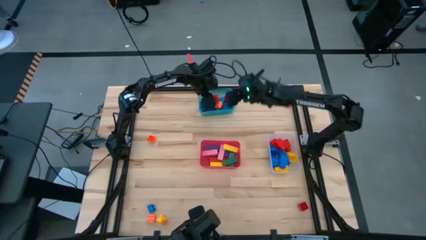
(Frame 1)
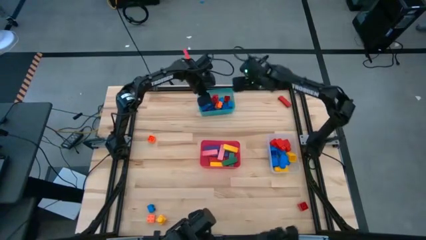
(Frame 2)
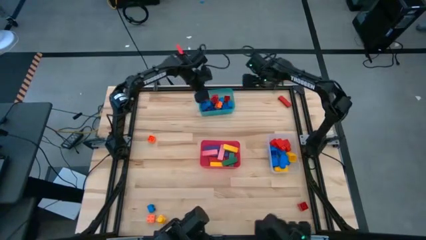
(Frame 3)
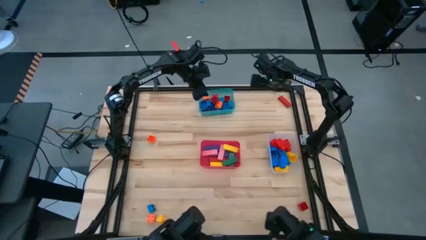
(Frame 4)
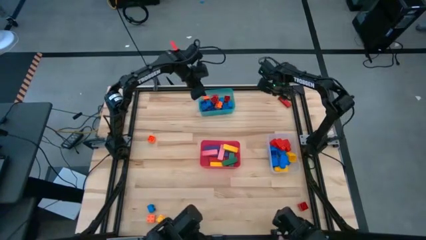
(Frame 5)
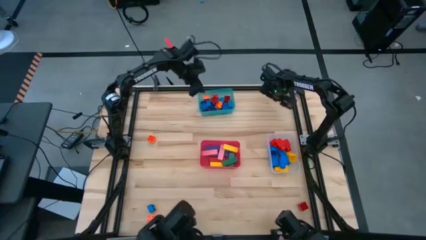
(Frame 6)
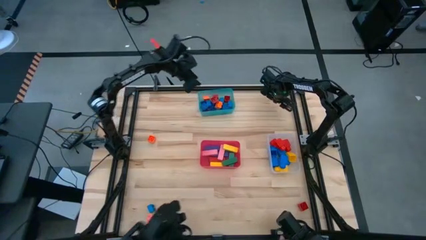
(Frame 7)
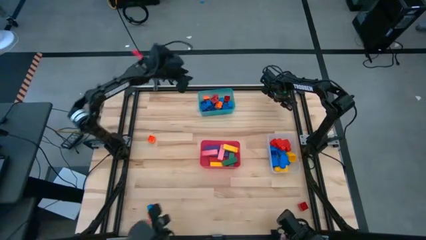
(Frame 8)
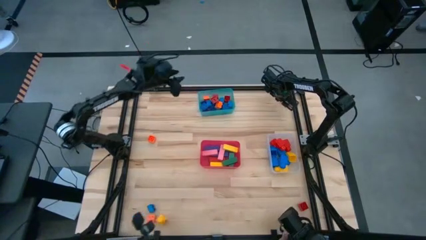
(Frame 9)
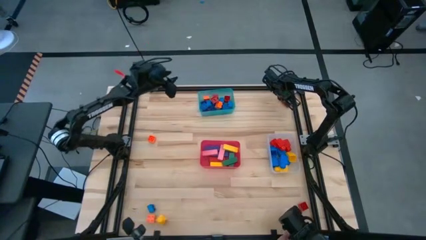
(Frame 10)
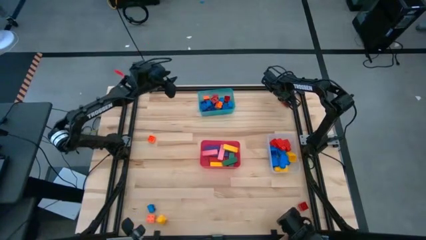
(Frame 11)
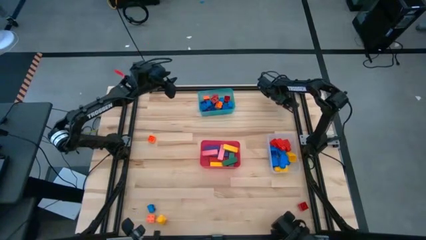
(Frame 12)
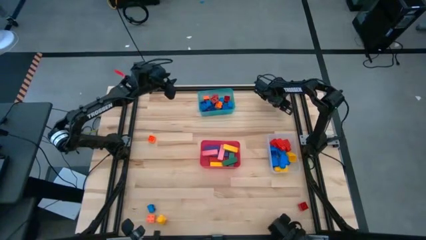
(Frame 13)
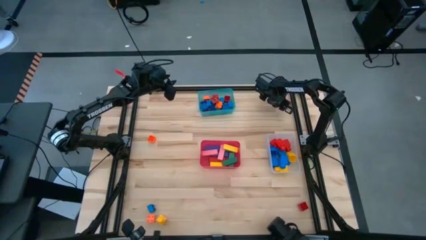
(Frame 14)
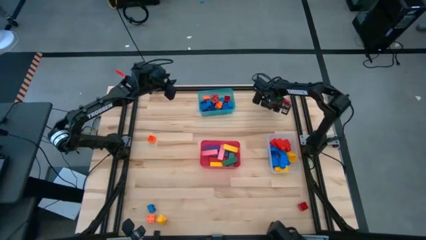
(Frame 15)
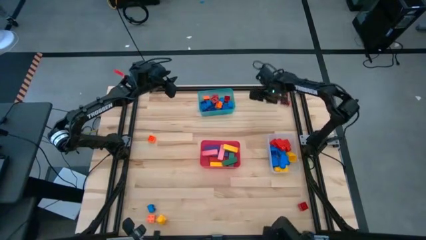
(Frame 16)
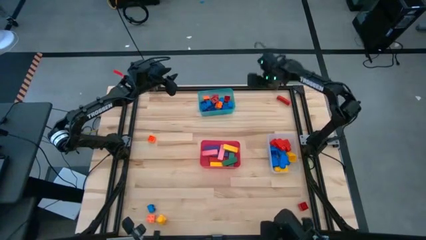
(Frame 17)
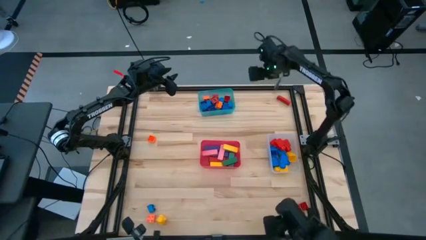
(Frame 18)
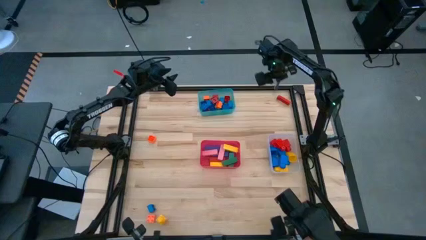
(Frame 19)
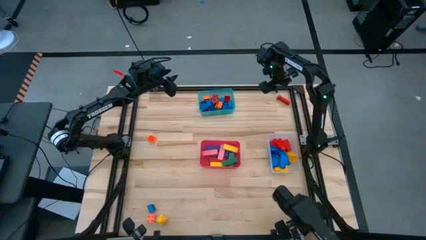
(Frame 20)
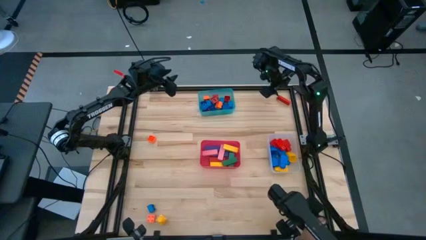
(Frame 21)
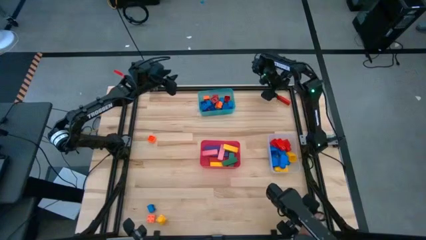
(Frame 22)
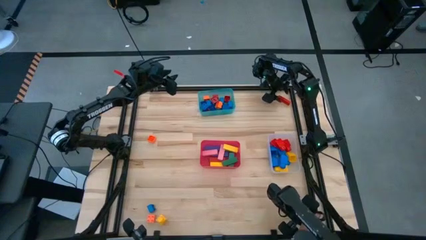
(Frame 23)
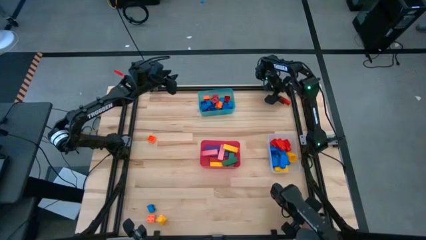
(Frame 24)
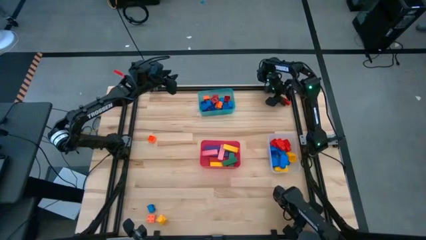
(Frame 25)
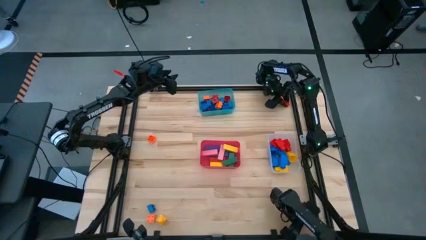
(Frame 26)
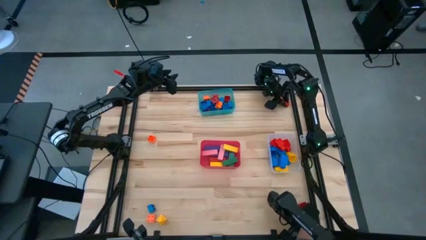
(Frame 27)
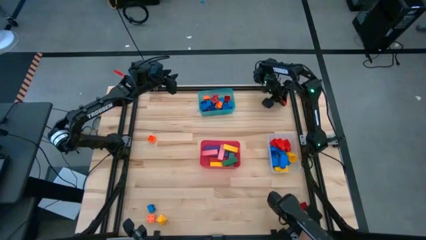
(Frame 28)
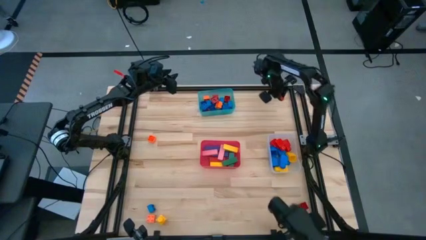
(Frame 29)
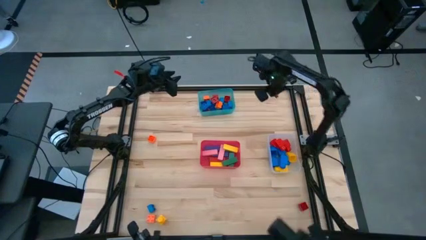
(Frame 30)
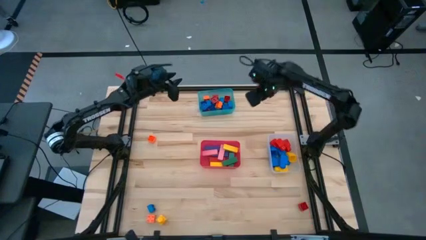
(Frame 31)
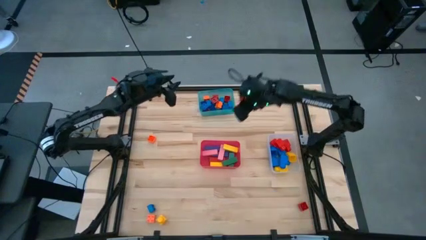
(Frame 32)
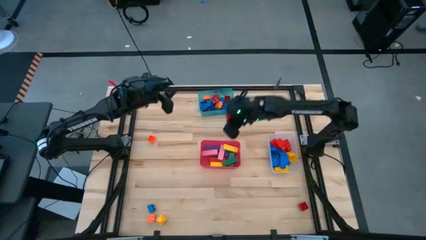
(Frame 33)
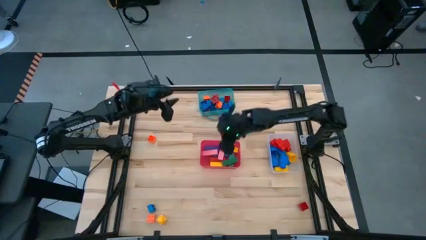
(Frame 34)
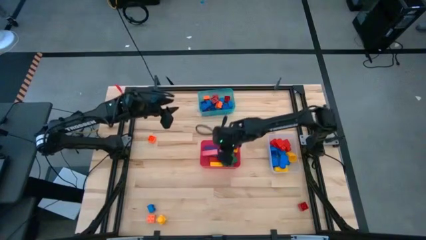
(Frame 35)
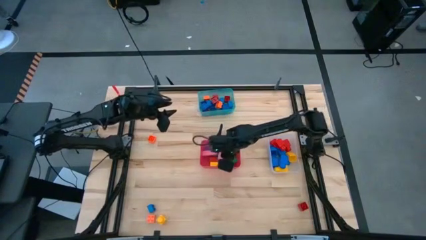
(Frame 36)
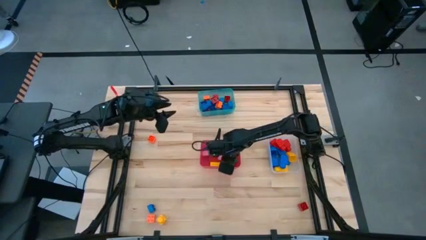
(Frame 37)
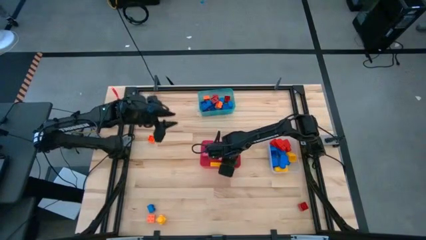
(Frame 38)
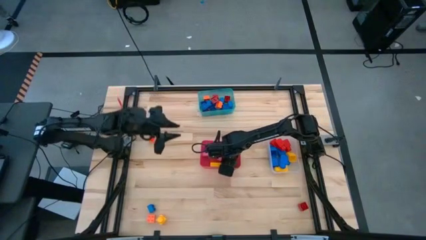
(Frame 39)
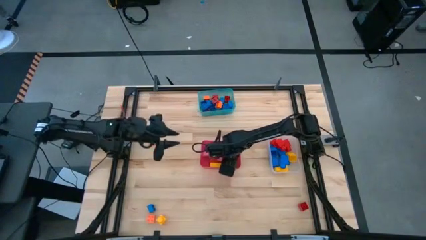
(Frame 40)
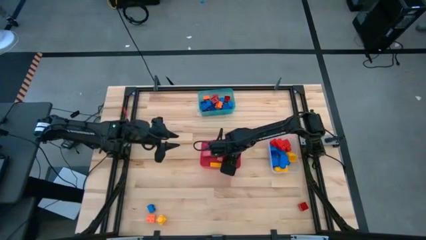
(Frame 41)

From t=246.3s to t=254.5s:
Task: Sort blocks by size
Put the red block into red bin

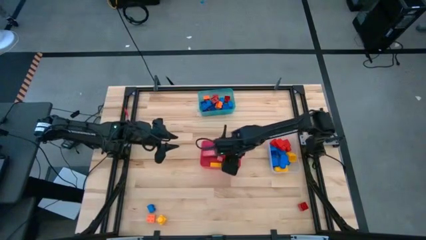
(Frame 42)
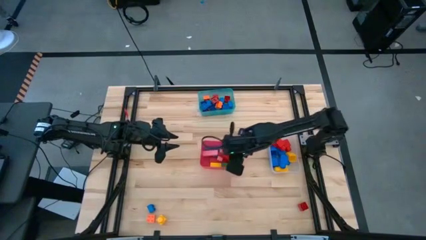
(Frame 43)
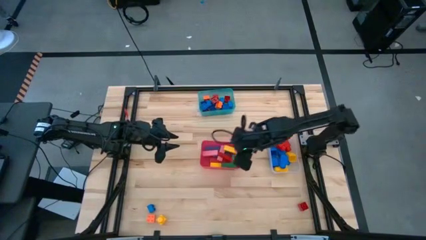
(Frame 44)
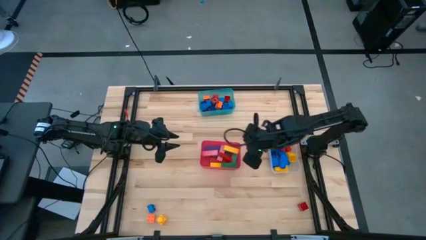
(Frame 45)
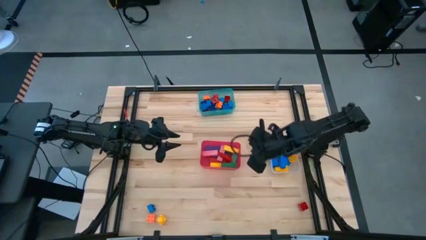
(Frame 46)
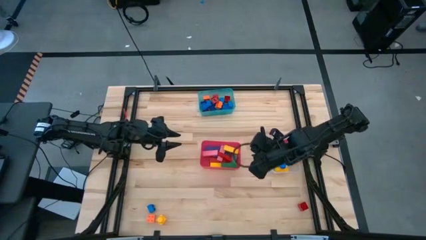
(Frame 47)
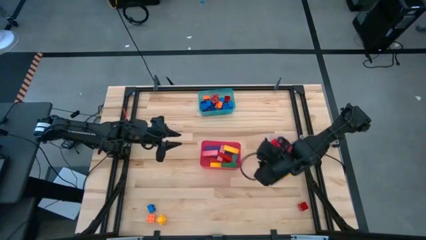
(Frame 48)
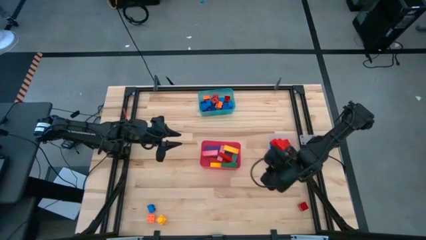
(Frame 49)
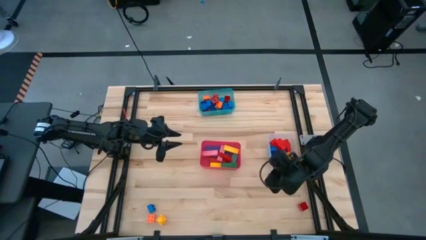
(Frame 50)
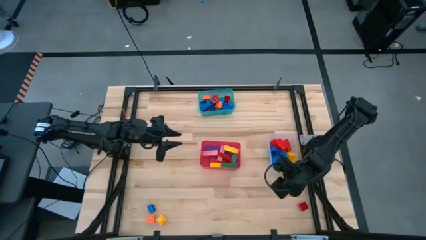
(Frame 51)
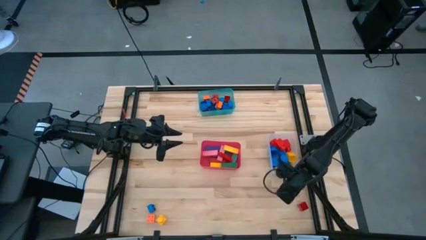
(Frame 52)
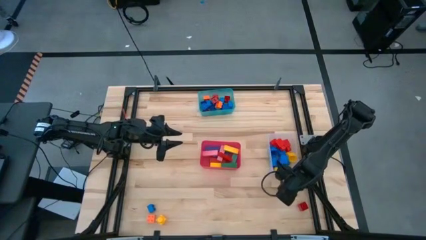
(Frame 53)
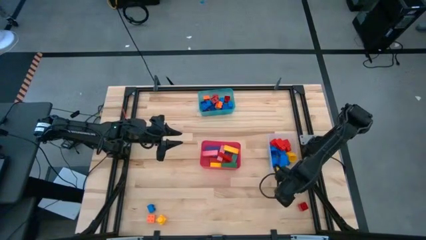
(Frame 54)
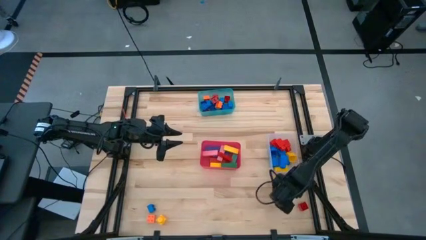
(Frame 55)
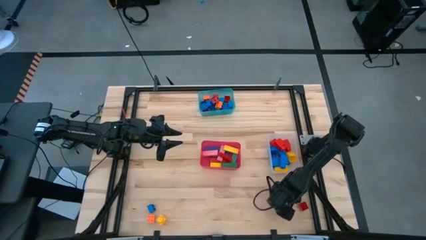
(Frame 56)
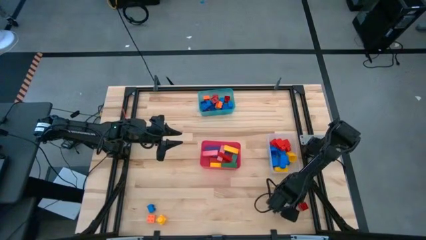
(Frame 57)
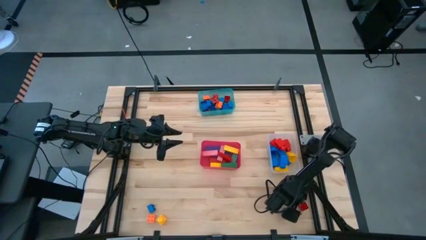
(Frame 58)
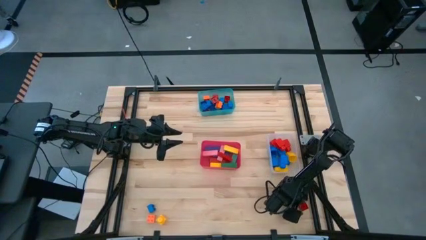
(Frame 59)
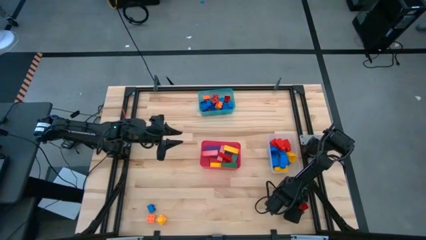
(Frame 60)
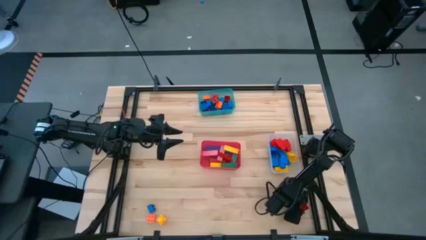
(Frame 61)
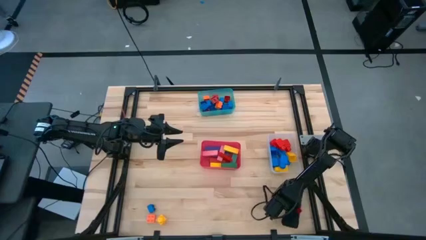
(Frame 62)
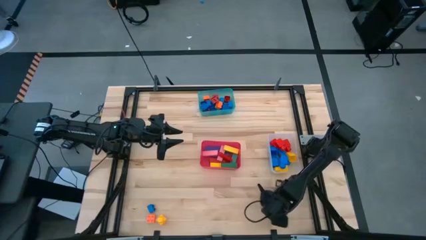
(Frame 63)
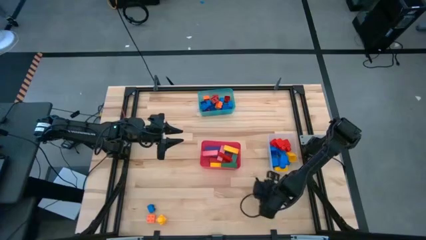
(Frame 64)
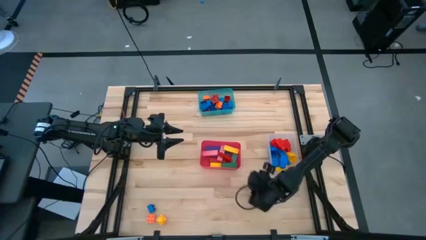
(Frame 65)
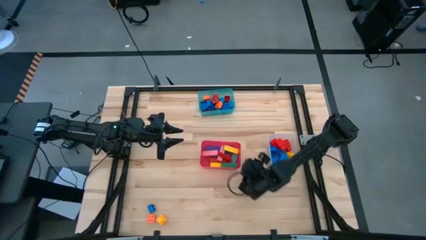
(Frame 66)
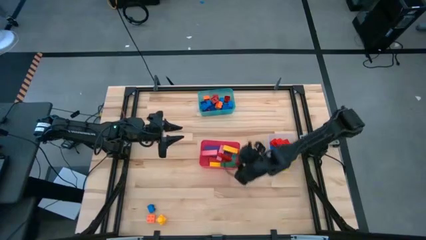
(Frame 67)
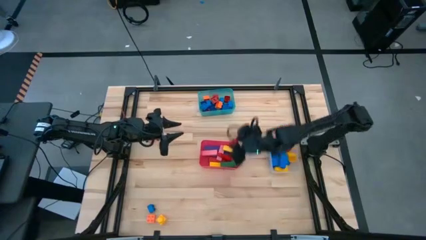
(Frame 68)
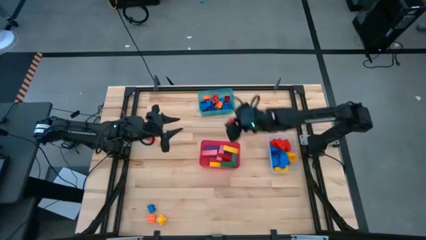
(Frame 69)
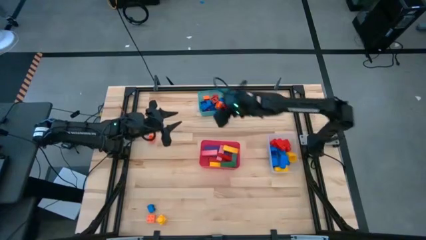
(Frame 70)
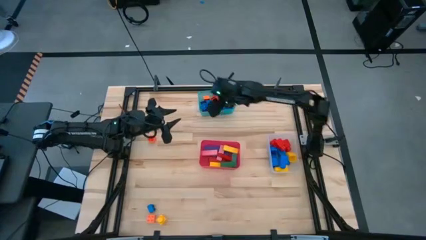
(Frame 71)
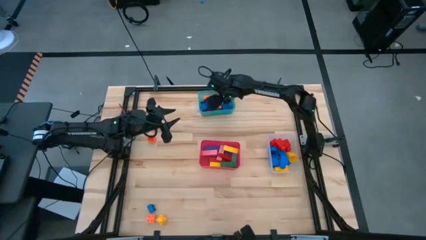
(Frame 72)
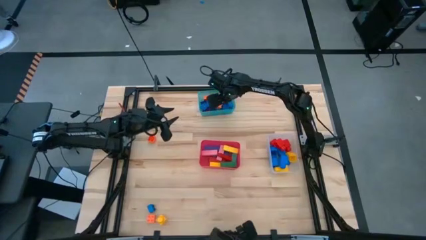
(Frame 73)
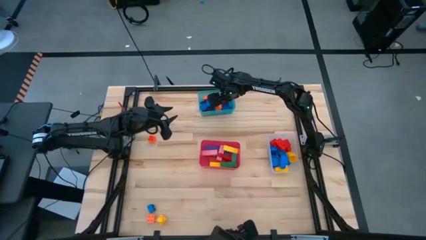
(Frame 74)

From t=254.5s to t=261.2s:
Put the red game 4 stud piece into the blue bin
